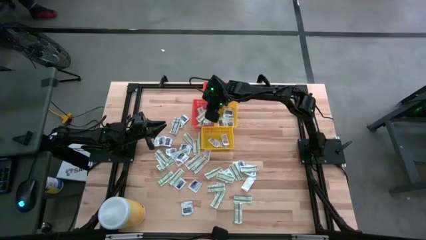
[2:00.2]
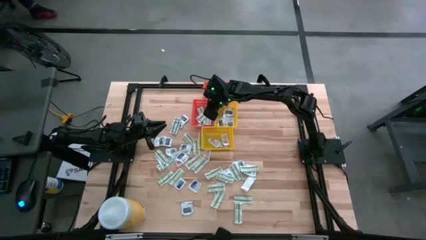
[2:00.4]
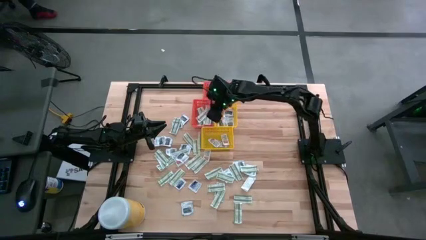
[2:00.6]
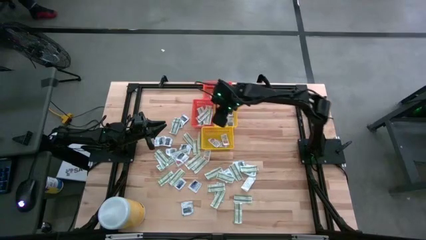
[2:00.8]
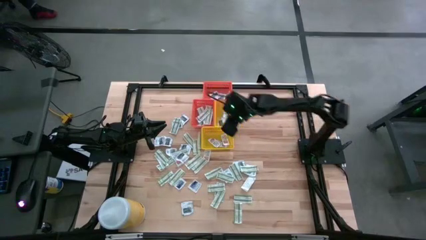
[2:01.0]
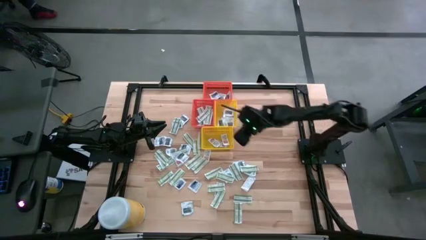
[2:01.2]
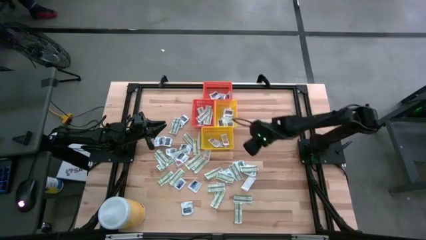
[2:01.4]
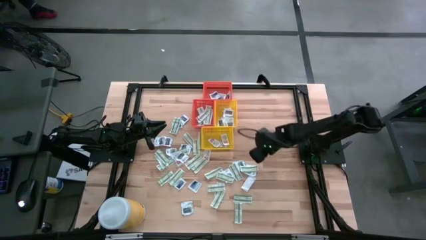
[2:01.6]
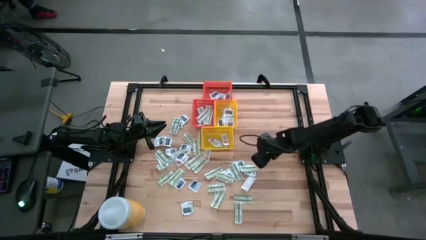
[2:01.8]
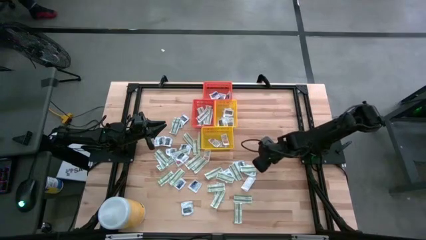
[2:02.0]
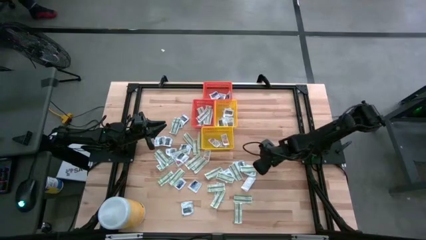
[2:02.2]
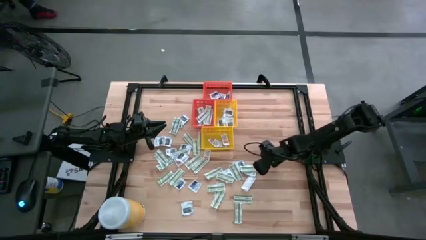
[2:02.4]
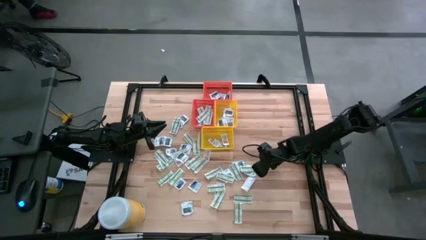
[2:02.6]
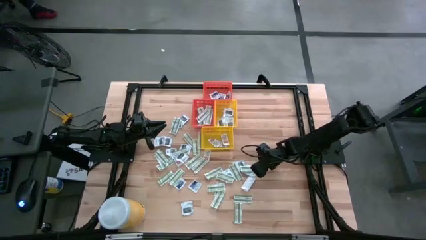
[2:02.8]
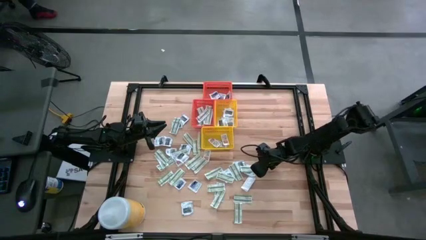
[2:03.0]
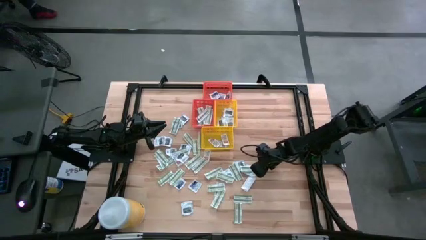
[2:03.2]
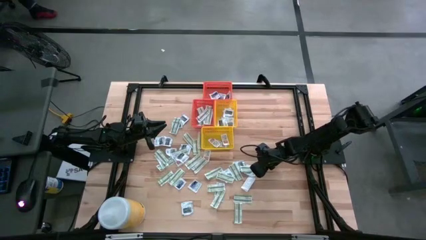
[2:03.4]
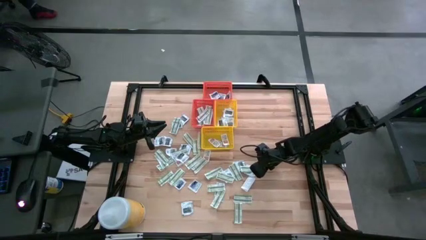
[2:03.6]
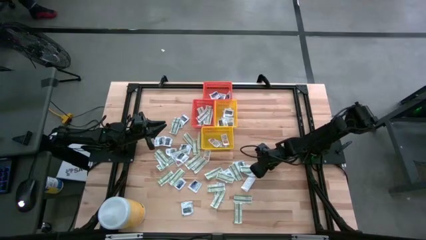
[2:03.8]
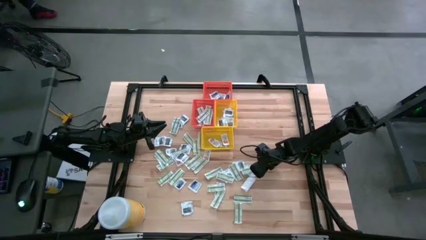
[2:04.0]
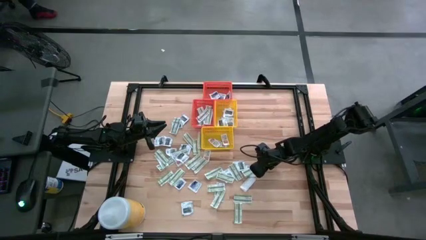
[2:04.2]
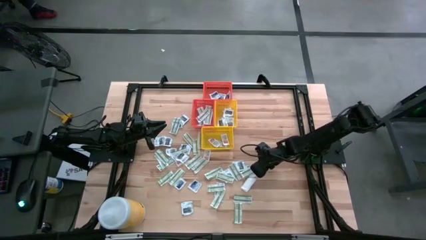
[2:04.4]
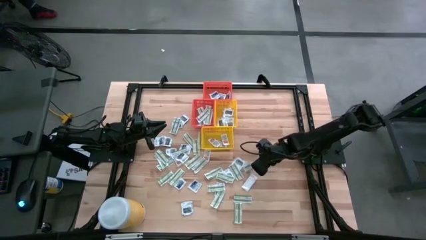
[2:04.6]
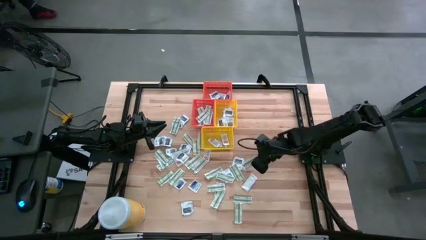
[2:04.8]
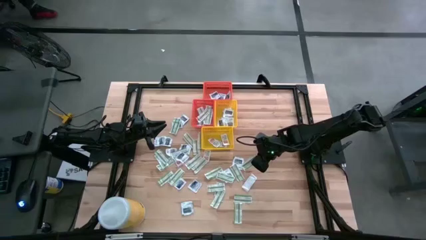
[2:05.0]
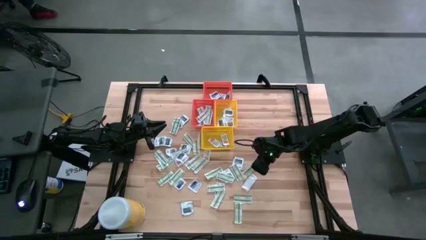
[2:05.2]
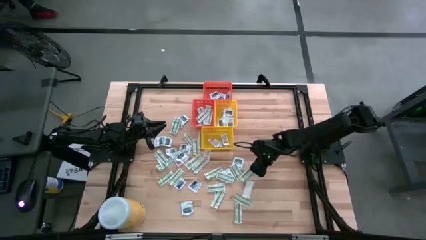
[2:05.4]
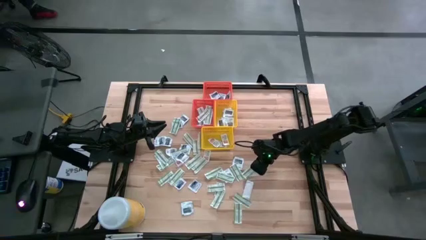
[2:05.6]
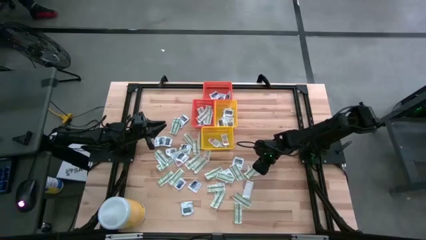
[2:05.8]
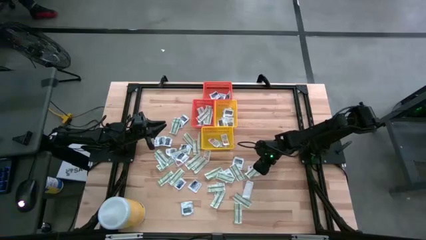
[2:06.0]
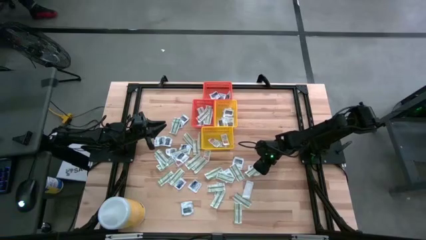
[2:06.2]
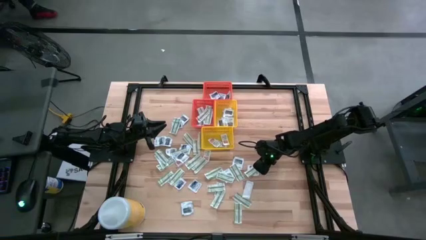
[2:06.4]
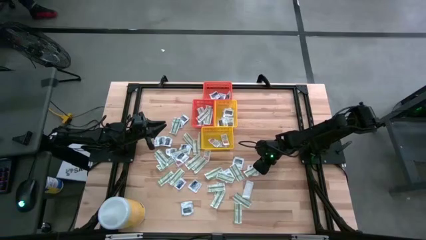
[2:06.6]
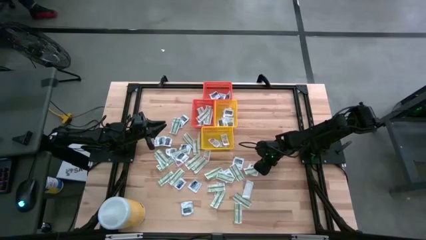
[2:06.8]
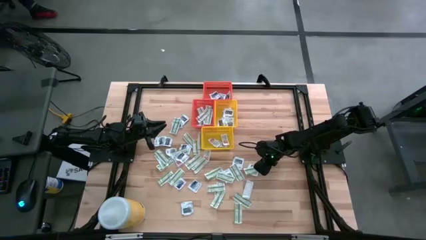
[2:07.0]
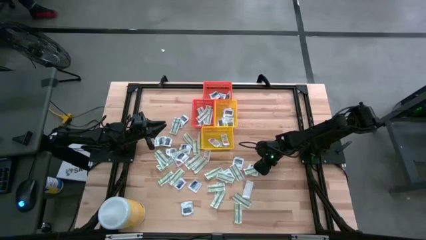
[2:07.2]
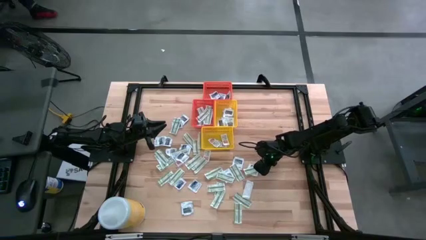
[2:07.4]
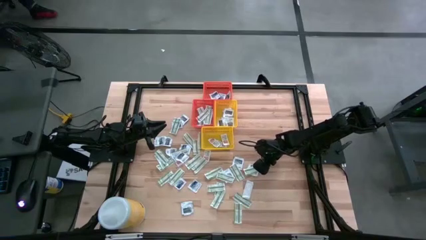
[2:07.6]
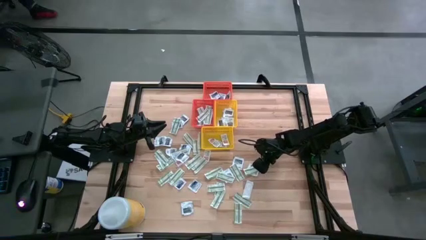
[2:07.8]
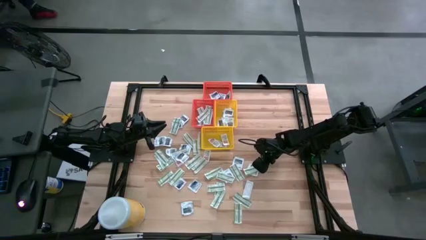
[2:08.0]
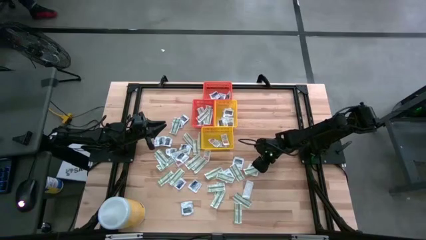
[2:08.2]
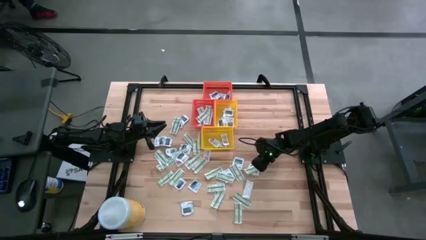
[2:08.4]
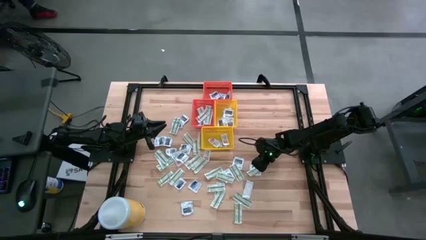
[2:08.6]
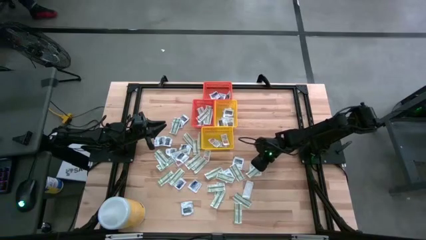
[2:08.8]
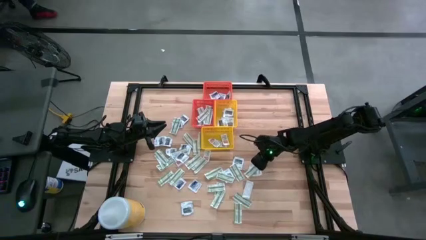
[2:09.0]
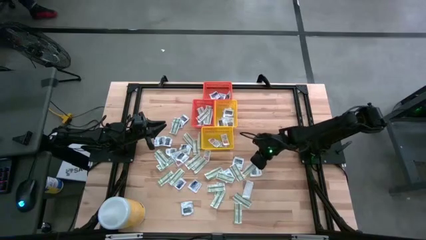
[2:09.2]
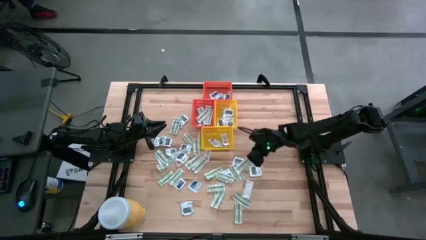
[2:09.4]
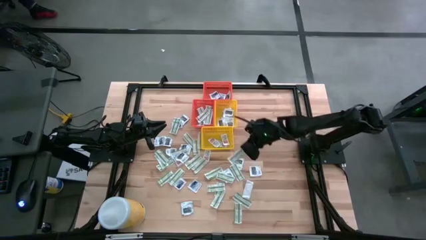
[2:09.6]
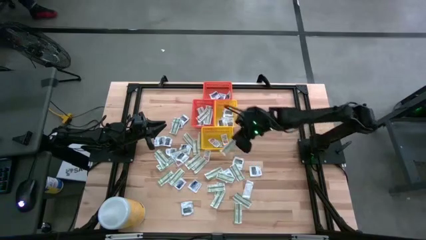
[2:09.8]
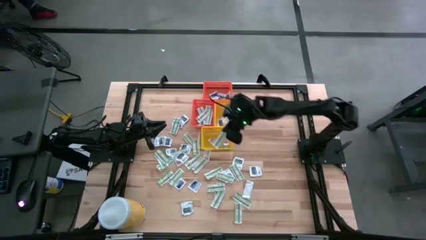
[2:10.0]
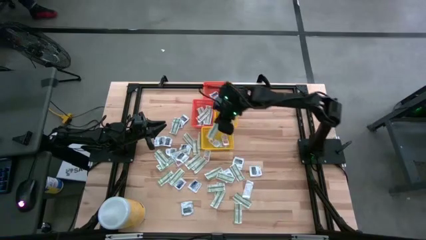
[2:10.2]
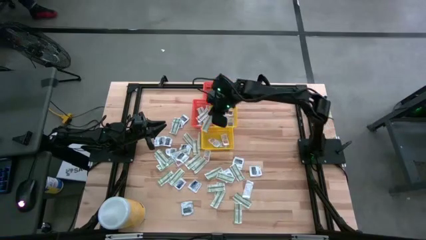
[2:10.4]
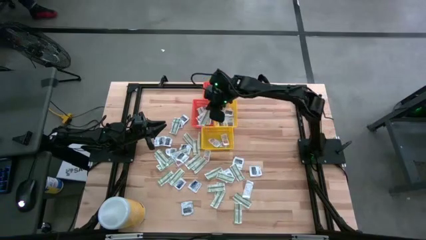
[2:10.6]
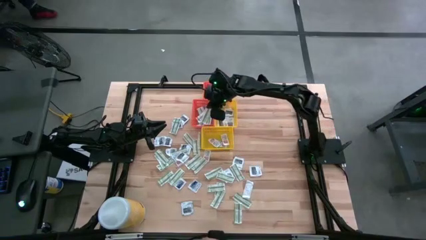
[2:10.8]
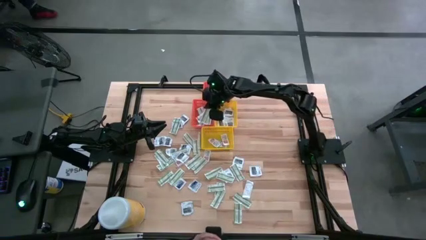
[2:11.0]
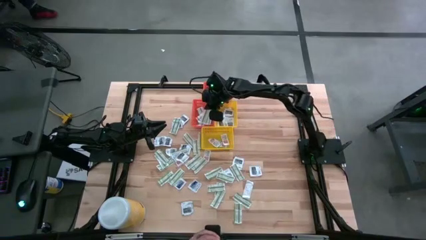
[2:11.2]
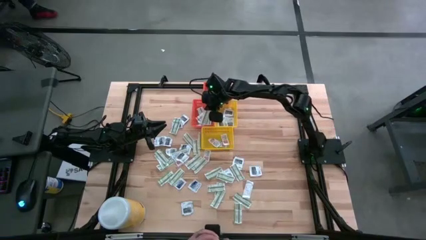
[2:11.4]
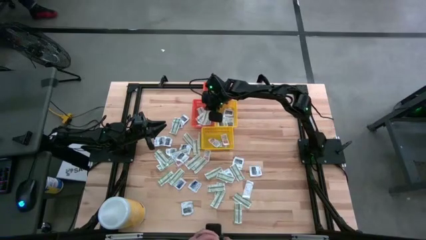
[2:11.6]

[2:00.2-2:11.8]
Task: Pick & Place First Aid Supplies
Put the bandage into the bottom orange bin

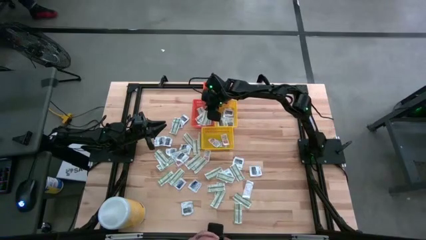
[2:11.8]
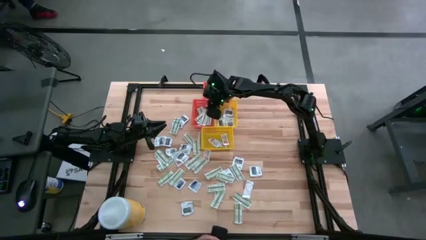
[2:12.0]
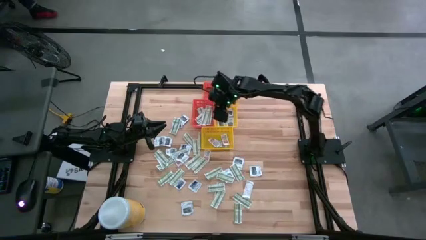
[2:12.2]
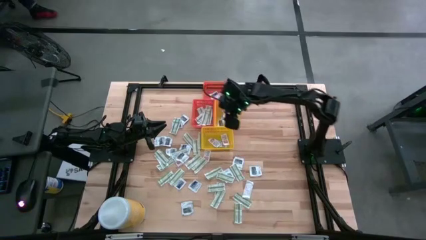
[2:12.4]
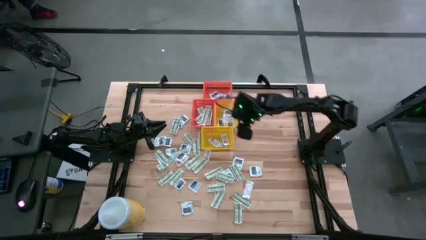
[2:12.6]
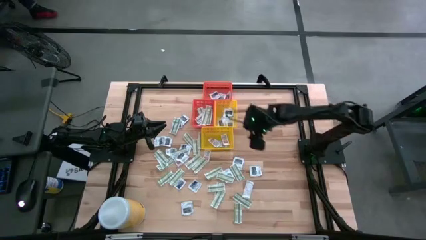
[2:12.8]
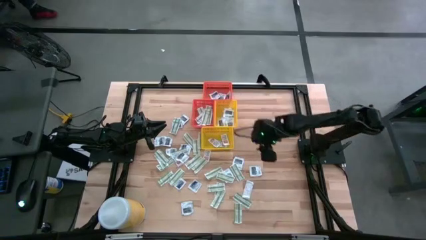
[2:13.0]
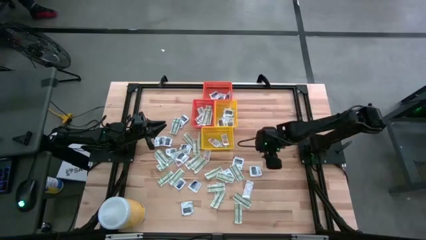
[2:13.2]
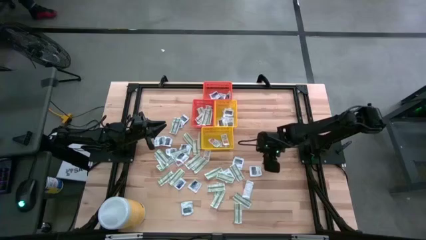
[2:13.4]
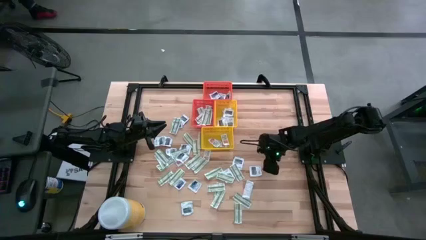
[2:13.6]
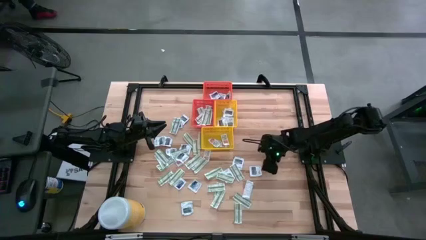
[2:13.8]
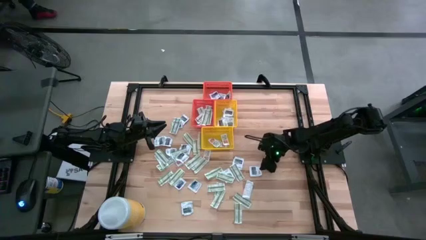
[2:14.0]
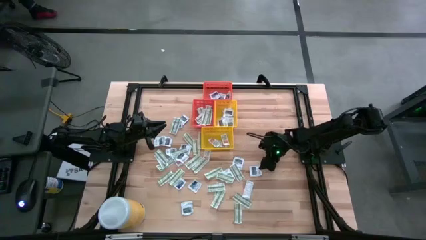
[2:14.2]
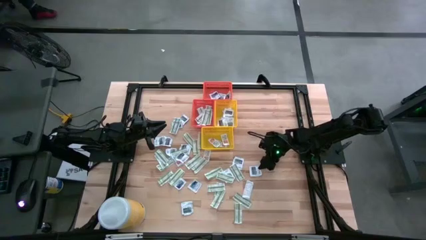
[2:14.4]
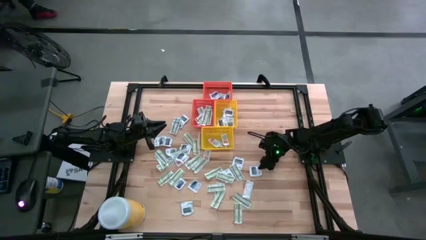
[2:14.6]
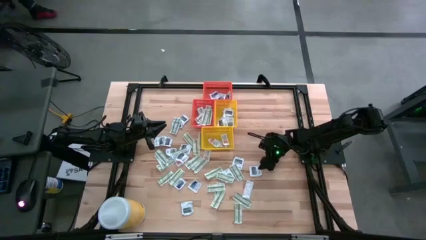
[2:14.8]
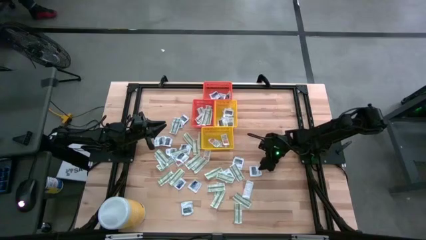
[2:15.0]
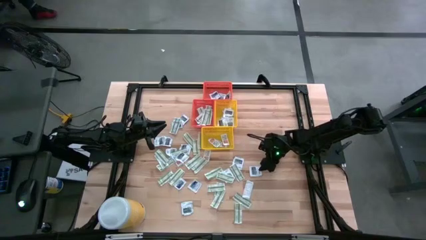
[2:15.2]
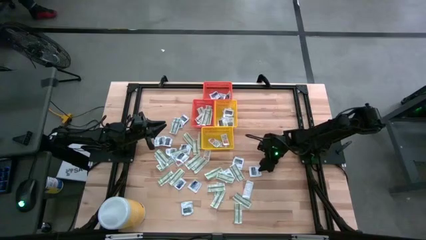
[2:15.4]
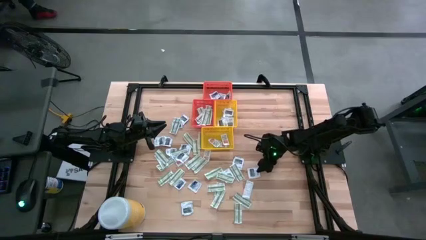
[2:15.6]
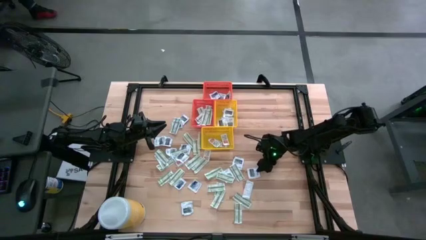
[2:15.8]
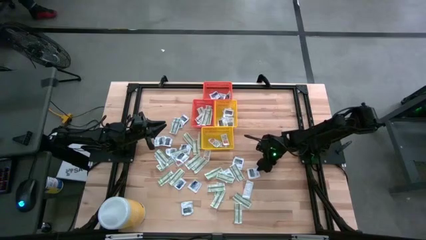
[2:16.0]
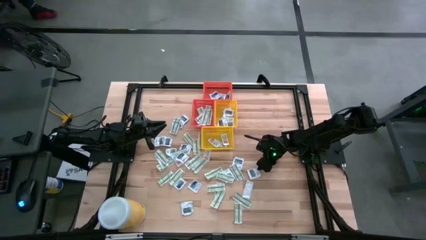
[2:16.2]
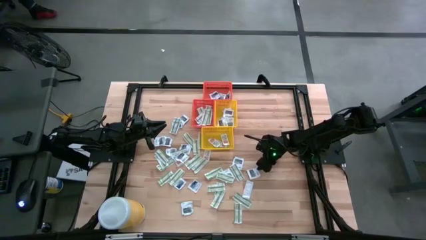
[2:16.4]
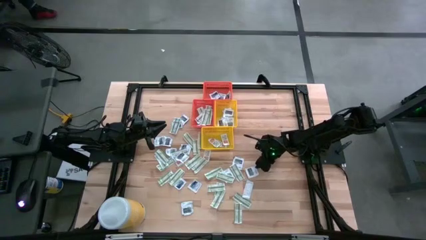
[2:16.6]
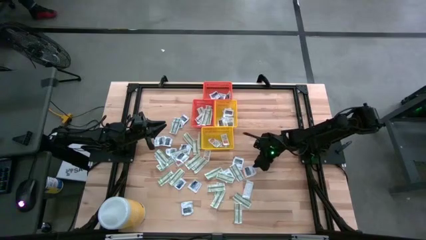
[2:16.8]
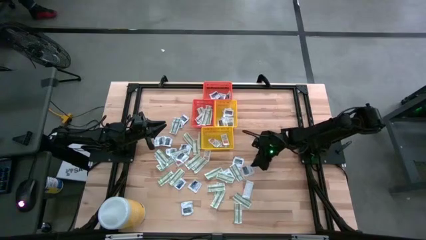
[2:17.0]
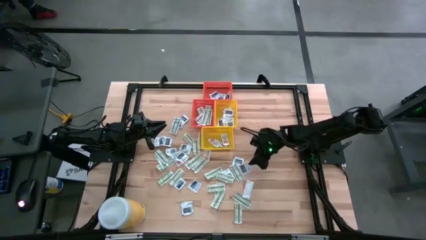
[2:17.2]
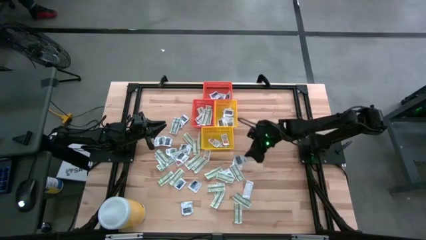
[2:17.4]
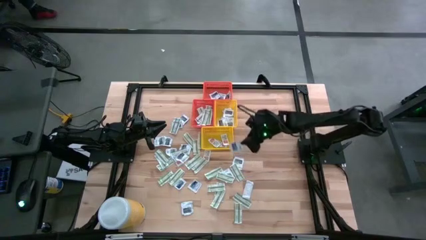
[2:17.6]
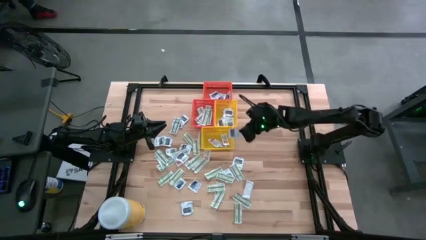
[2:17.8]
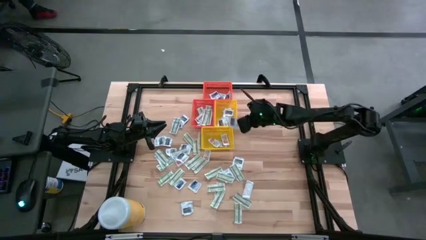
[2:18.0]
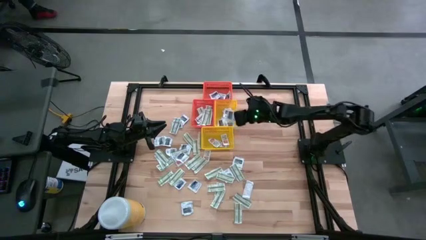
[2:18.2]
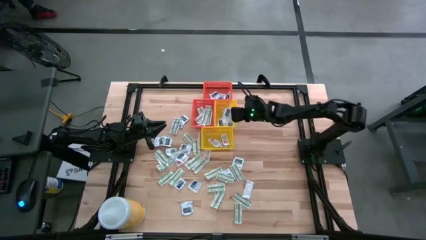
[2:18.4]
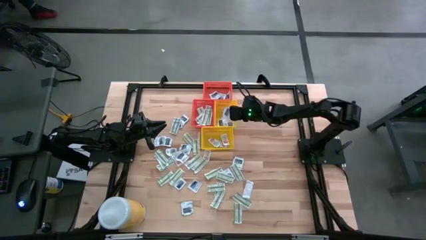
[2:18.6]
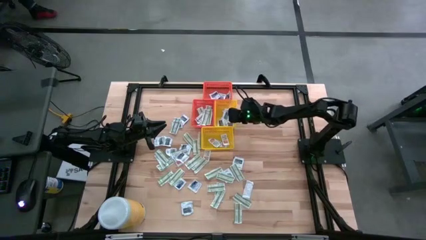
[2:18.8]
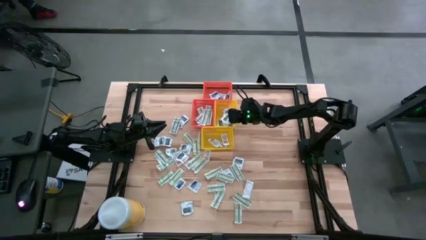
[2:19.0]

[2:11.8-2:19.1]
Put the towelette pack into the top yellow bin
